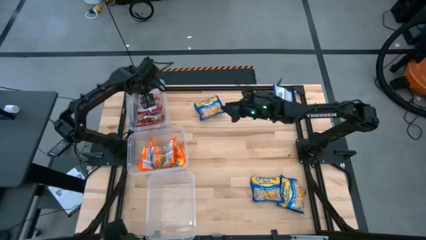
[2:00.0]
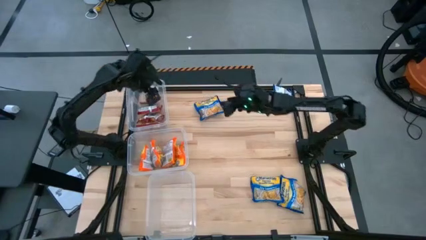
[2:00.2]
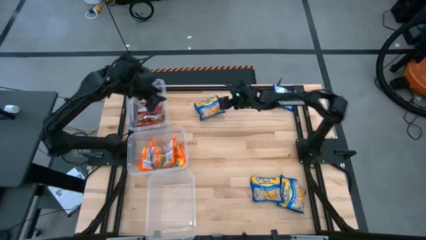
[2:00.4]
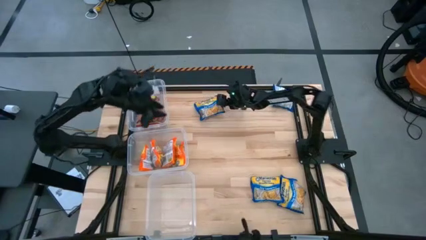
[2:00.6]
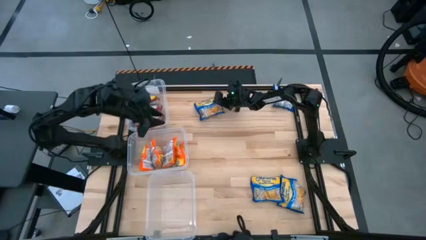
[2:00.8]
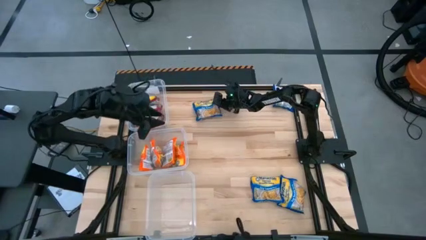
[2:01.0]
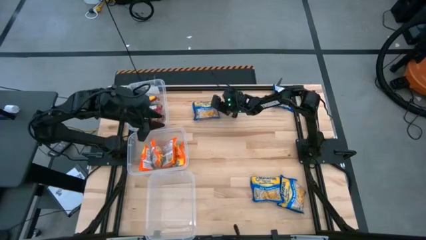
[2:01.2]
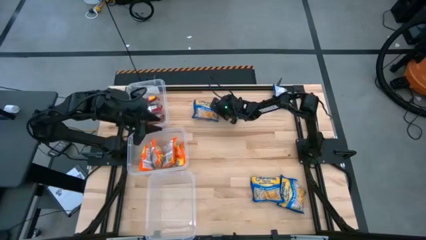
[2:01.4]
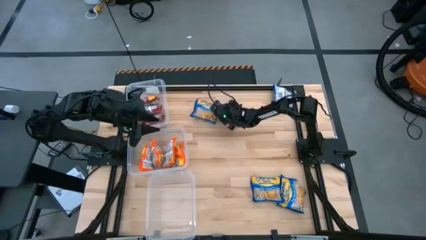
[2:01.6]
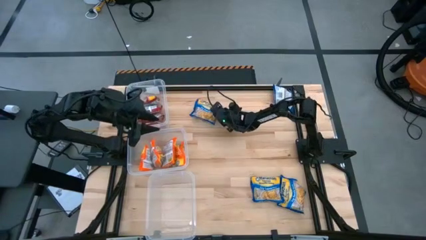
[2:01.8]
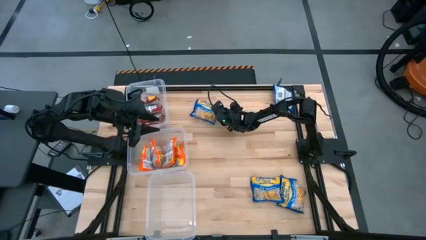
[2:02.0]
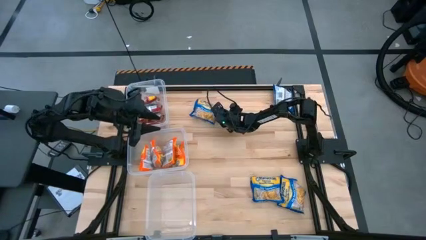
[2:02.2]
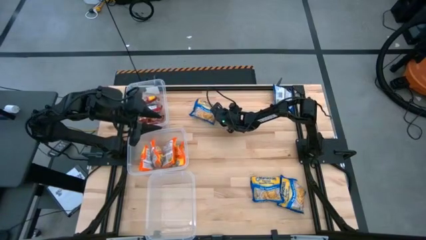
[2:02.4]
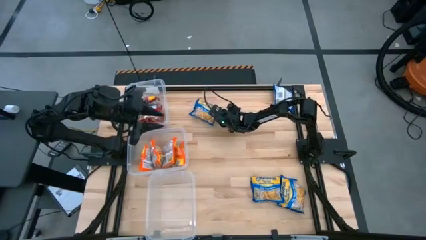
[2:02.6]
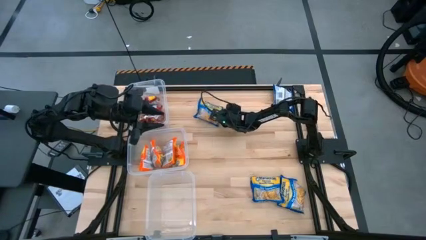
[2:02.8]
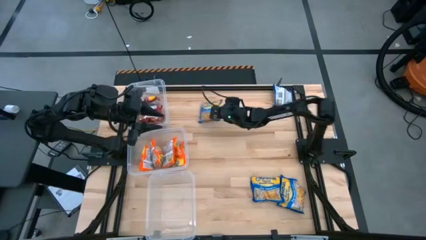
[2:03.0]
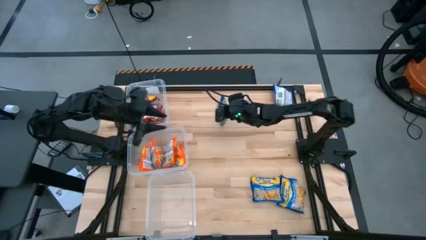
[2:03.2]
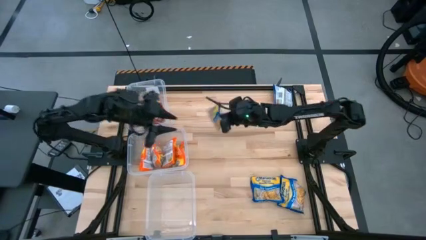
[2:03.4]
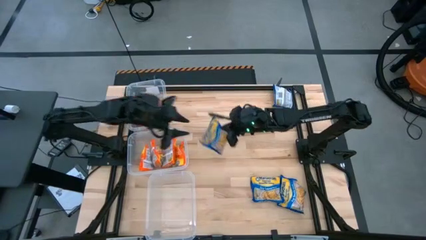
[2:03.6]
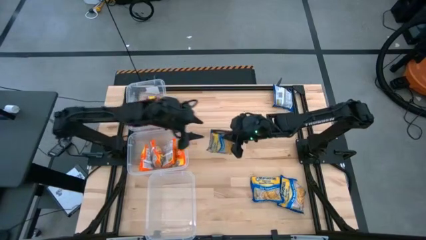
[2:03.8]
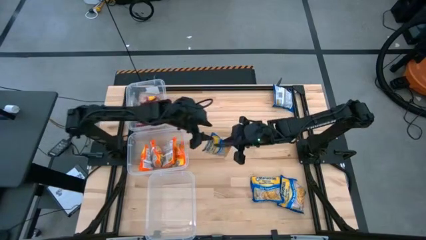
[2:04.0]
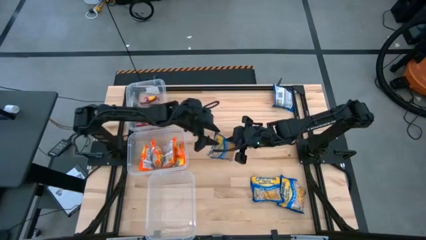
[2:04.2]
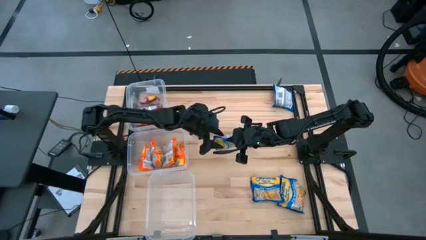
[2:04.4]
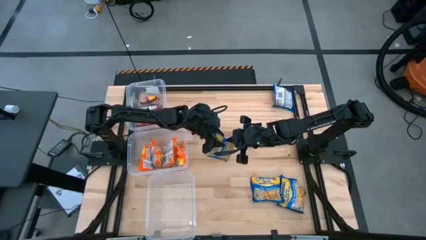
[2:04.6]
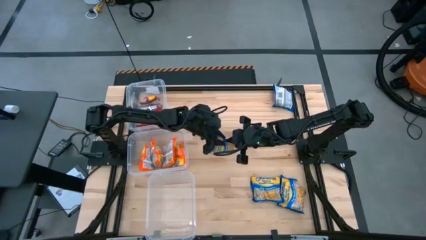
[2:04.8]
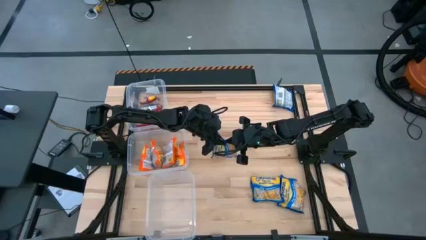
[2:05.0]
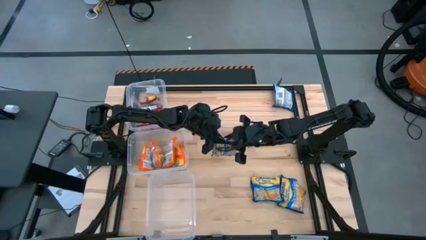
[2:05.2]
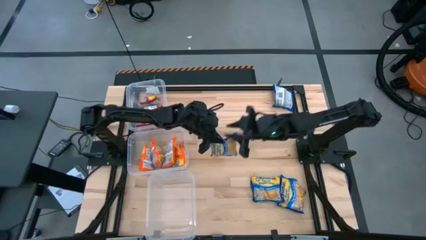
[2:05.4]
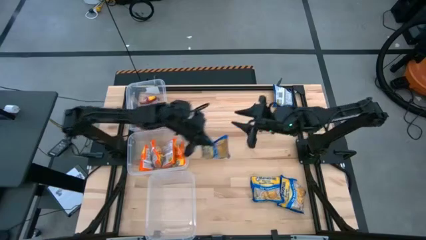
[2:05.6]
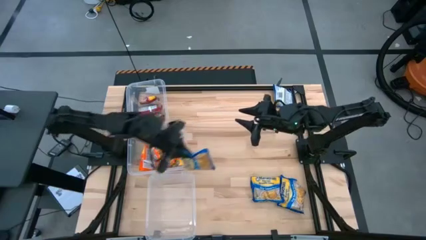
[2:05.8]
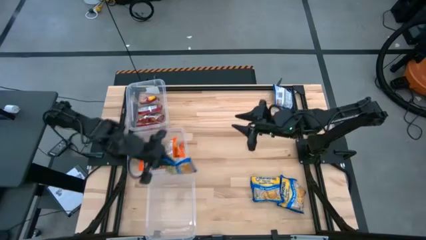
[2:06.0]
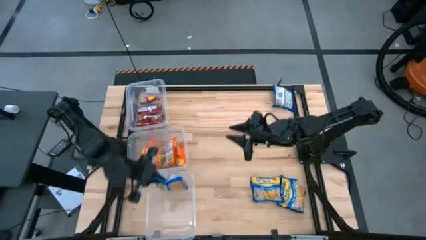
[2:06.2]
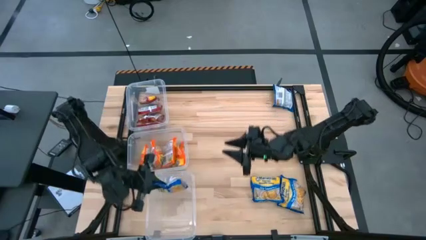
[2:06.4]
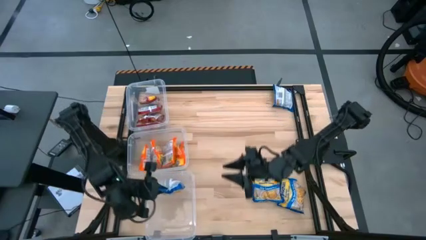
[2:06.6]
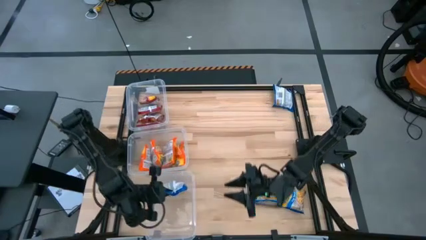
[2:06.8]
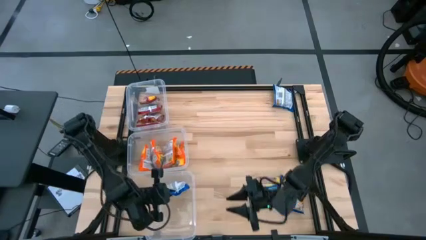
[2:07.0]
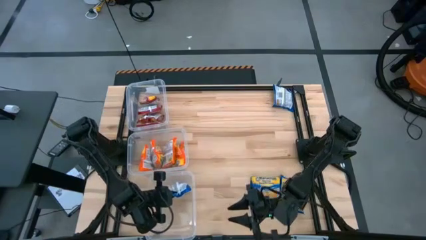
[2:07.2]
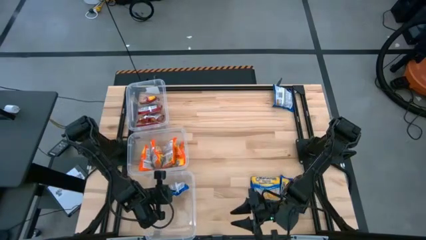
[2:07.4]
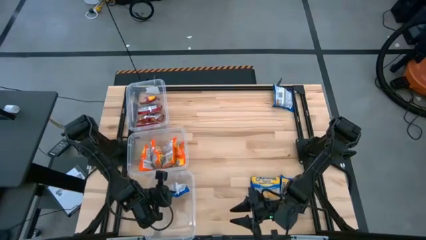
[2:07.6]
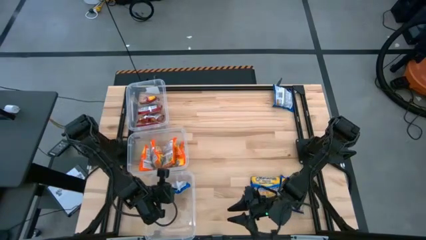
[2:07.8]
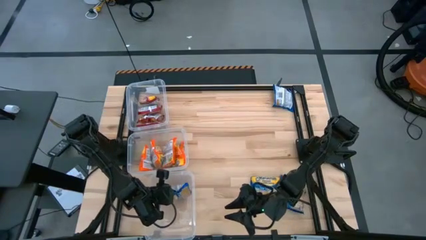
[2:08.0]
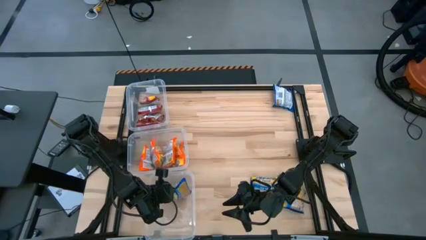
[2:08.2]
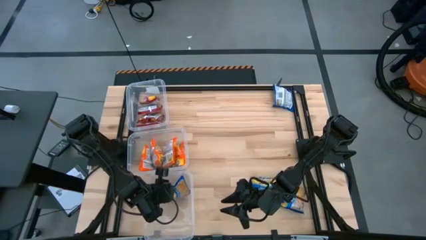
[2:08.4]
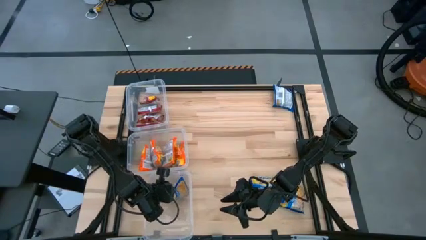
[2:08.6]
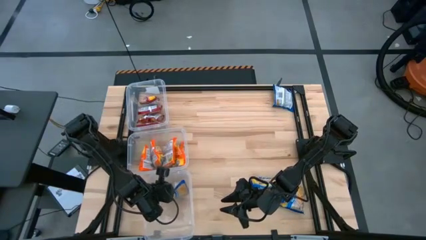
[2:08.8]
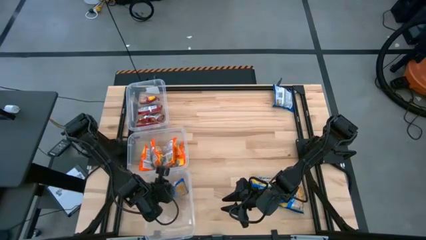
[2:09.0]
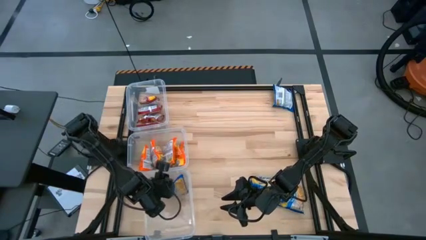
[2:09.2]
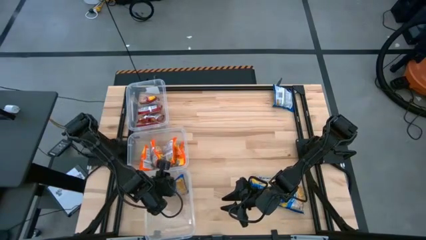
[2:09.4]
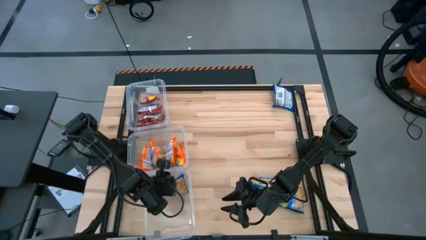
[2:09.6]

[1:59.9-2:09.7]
Task: Sort Maruchan noodles
Put the blue noodle pack into the bottom transparent bin

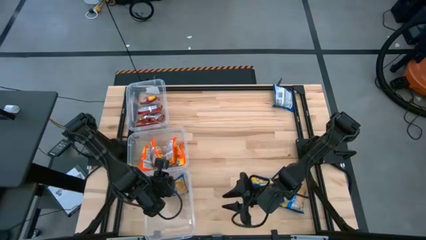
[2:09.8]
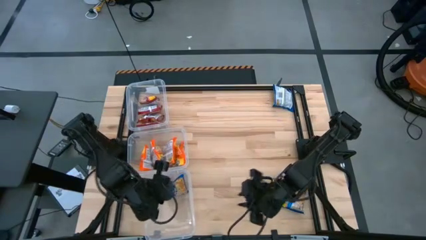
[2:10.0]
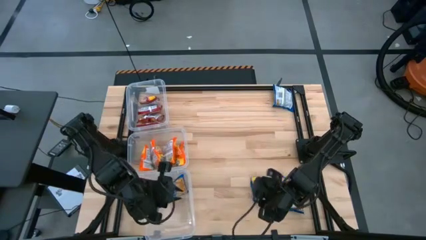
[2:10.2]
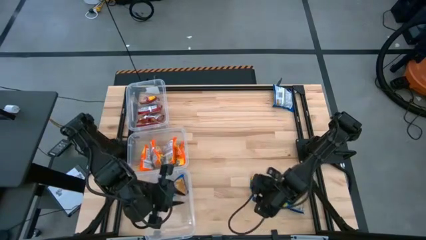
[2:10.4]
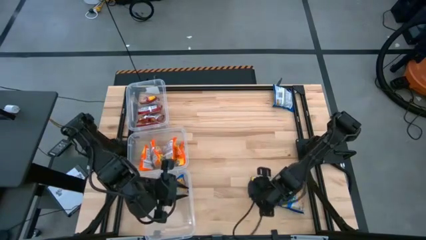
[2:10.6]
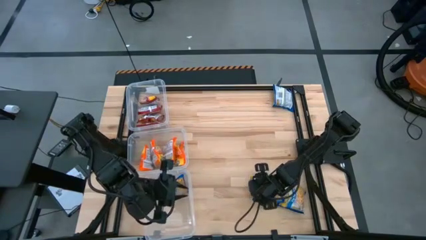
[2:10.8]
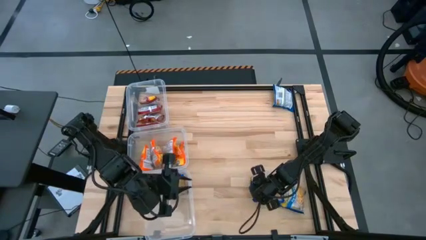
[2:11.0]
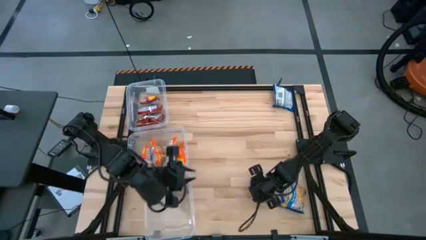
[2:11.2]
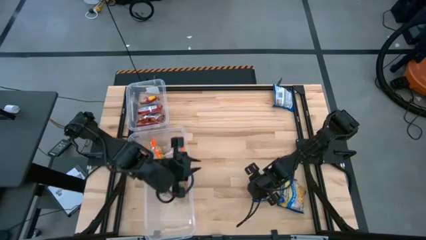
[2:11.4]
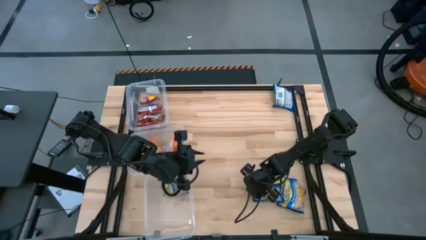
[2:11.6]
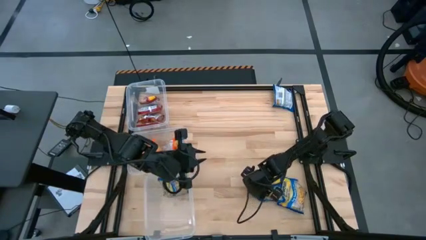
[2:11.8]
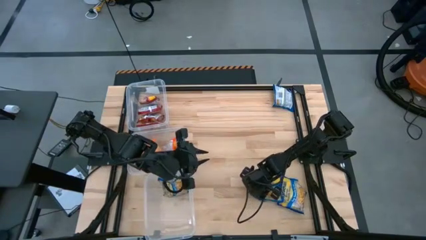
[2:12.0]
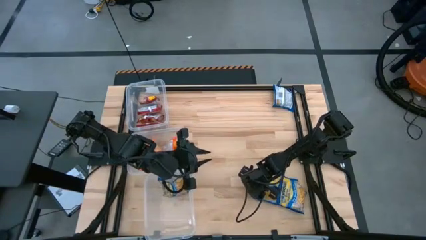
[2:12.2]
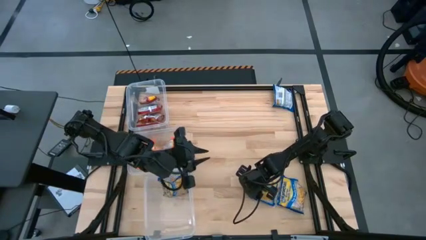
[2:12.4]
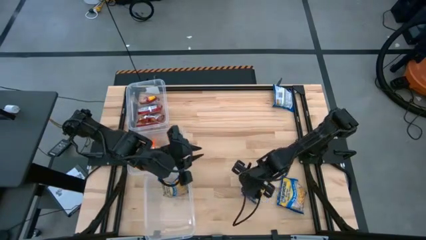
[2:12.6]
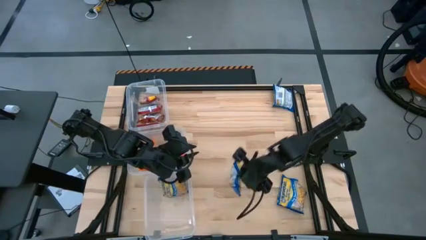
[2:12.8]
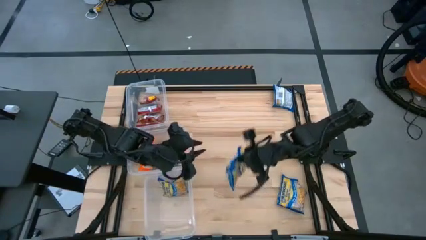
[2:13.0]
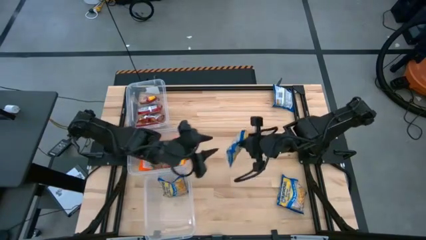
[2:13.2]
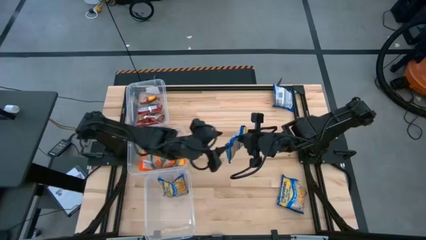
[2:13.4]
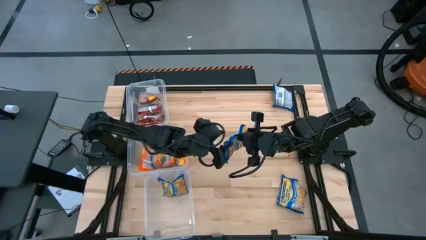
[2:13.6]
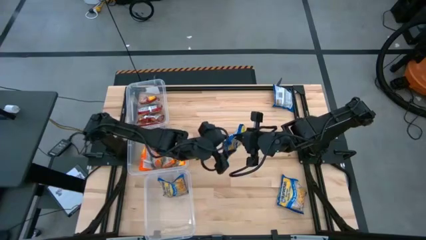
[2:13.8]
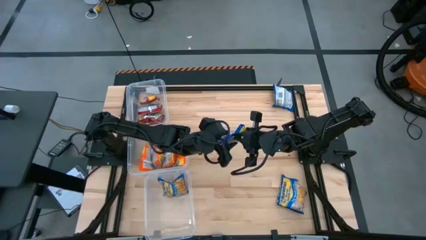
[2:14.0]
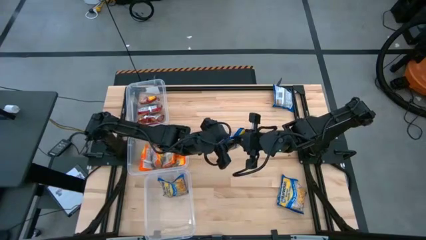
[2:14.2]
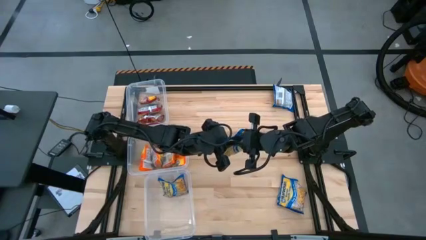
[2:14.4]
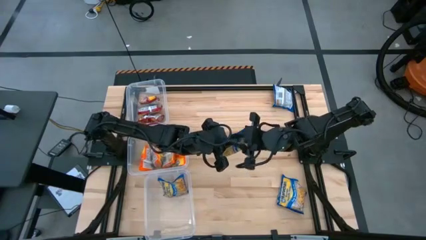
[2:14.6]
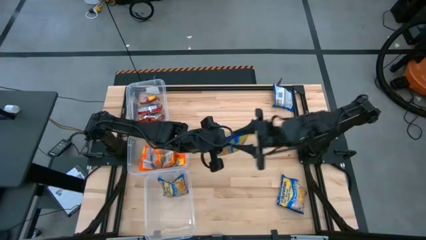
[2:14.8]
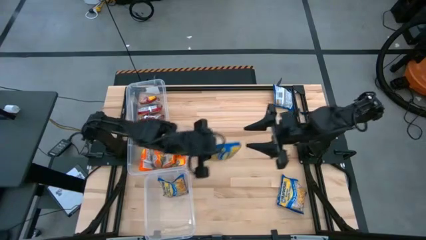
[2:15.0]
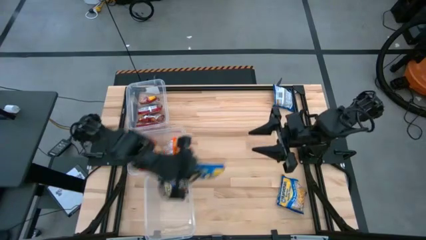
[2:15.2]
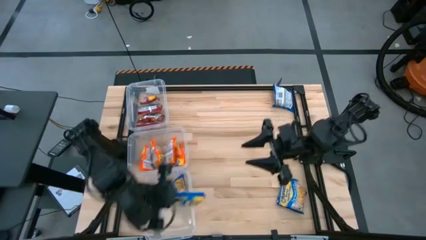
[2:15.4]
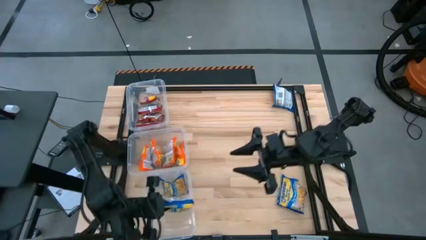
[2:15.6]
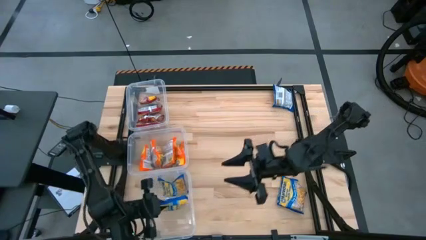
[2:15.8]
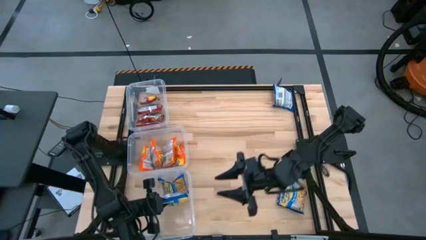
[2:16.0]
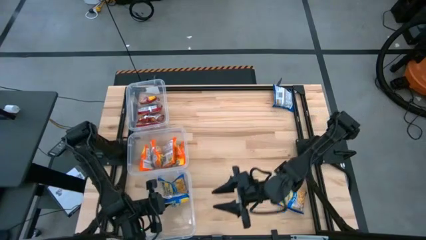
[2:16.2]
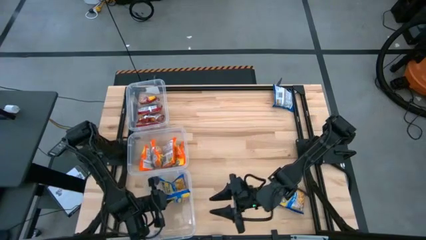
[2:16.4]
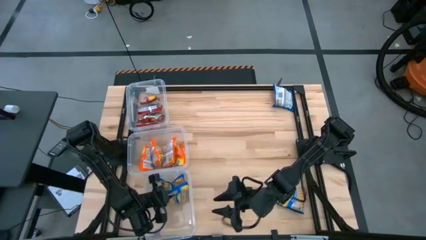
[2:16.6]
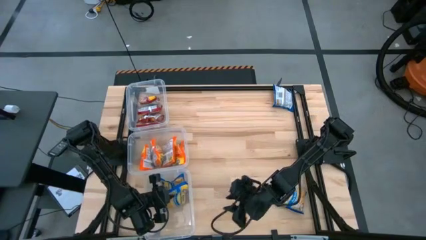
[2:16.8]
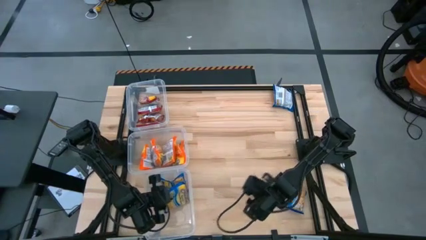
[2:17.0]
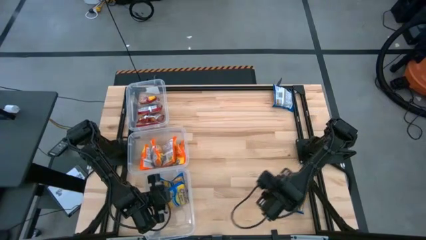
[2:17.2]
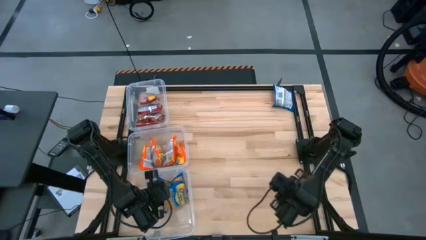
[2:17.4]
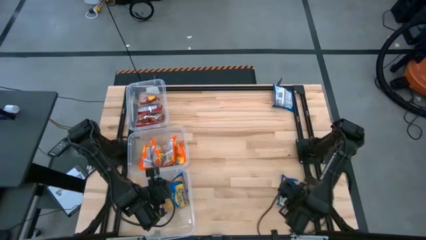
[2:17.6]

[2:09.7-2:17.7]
Put the blue noodle pack into the bottom transparent bin
